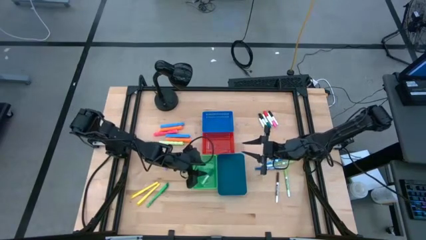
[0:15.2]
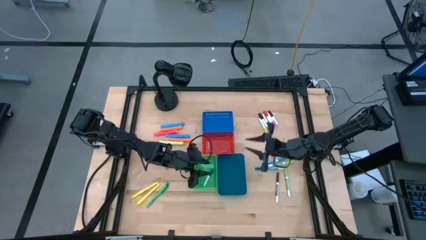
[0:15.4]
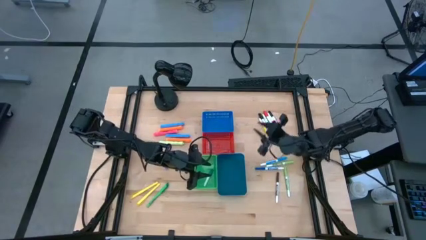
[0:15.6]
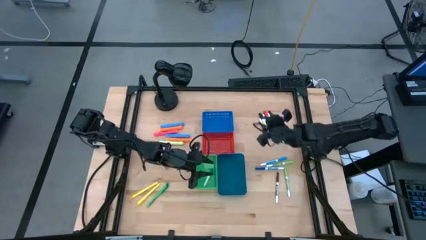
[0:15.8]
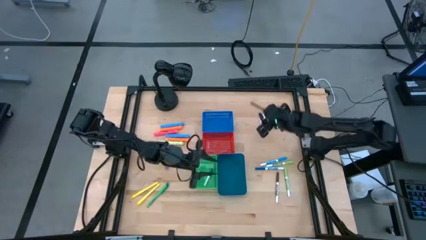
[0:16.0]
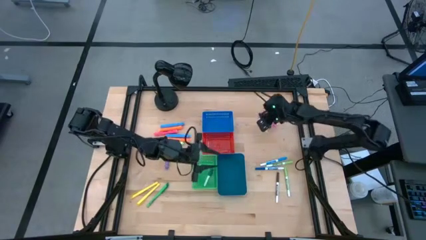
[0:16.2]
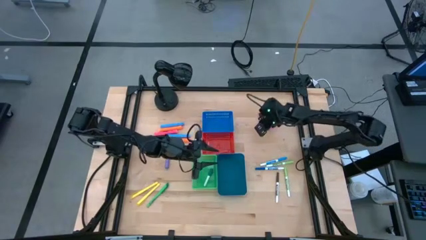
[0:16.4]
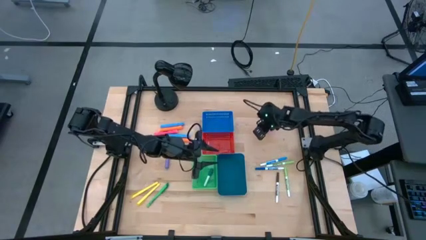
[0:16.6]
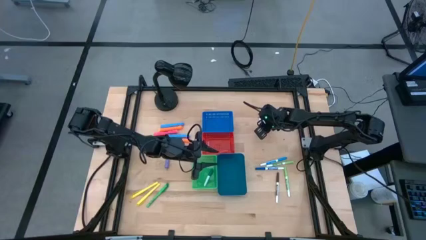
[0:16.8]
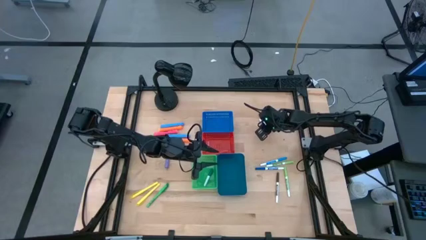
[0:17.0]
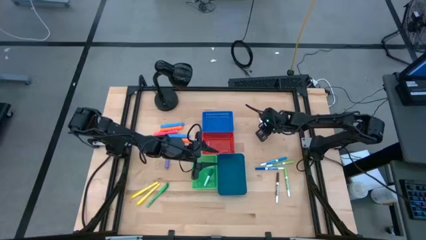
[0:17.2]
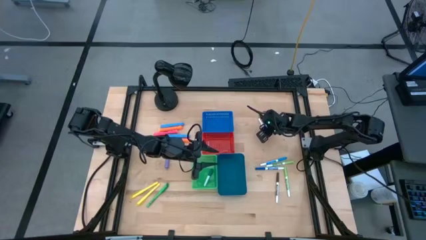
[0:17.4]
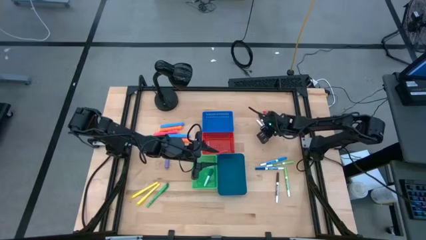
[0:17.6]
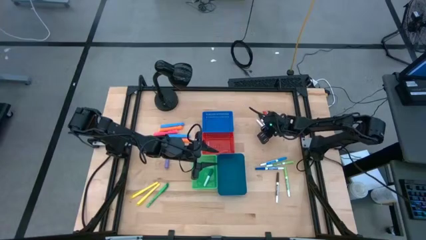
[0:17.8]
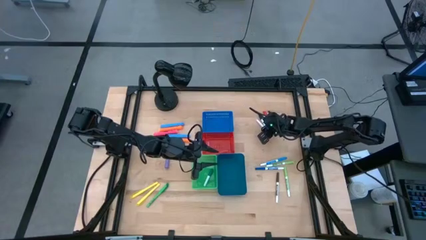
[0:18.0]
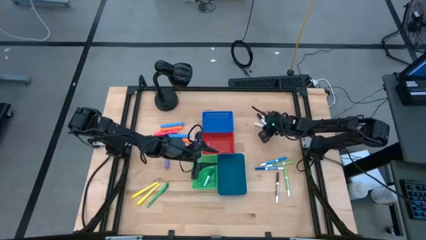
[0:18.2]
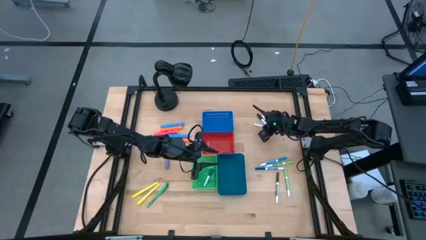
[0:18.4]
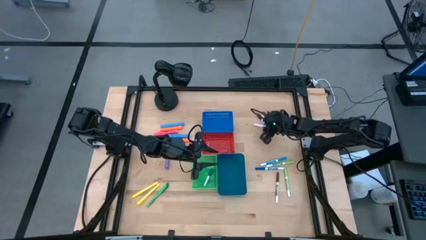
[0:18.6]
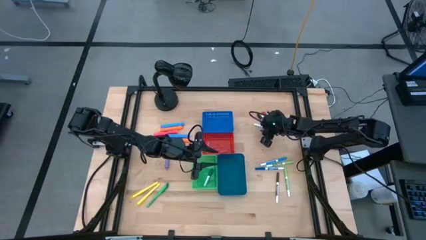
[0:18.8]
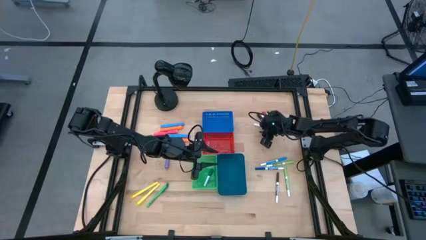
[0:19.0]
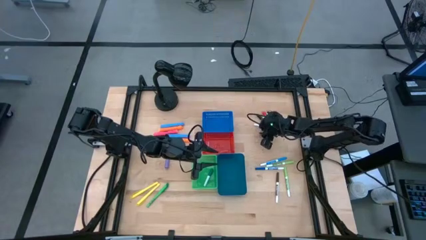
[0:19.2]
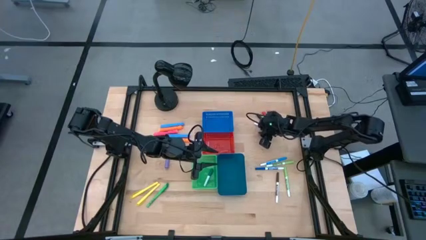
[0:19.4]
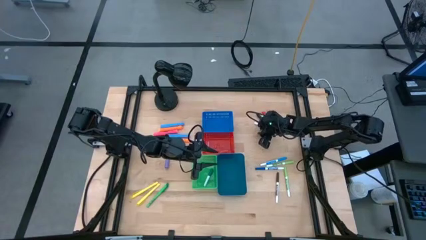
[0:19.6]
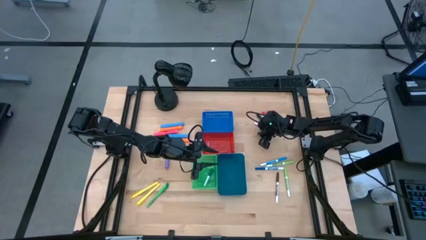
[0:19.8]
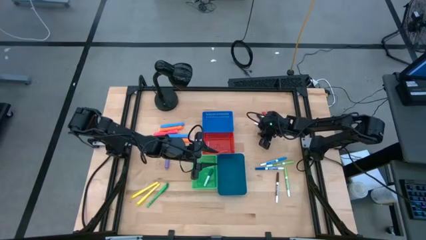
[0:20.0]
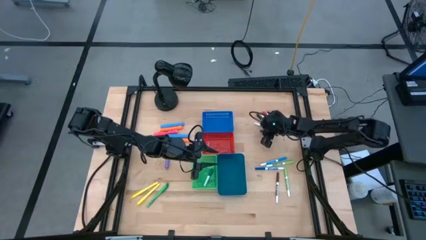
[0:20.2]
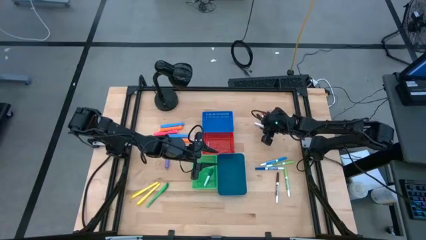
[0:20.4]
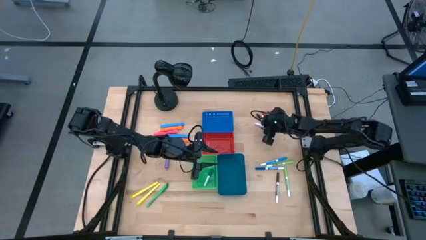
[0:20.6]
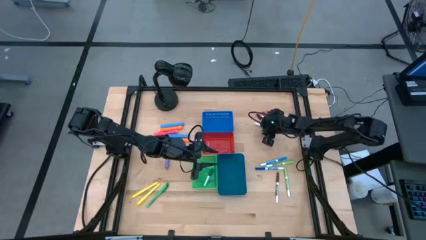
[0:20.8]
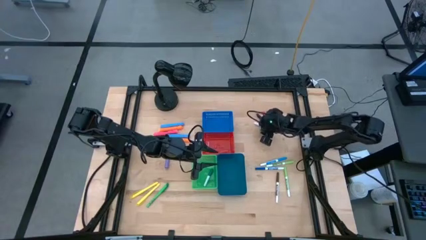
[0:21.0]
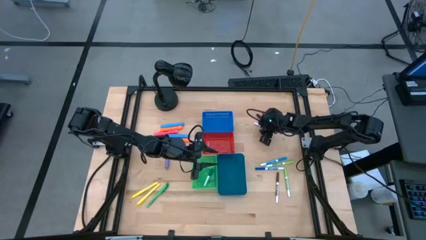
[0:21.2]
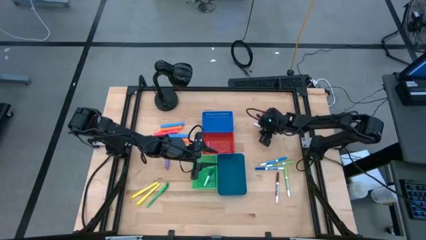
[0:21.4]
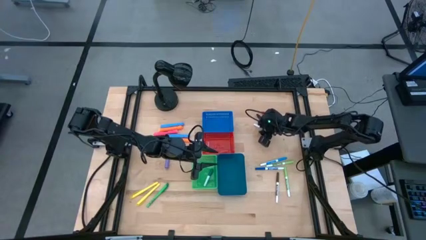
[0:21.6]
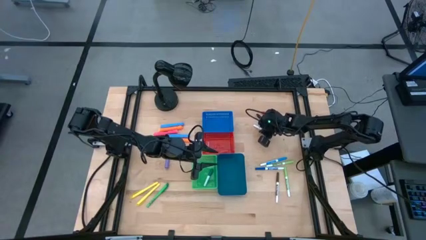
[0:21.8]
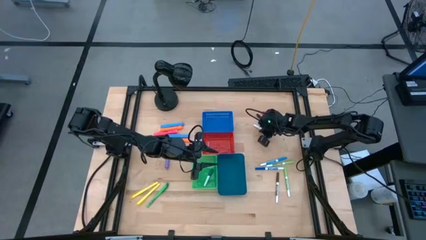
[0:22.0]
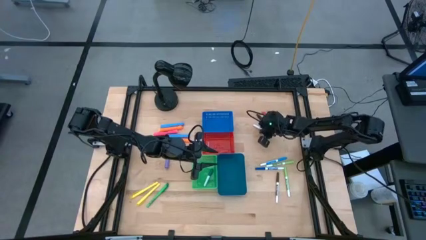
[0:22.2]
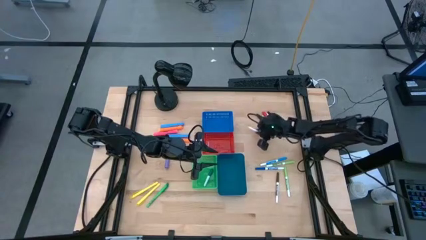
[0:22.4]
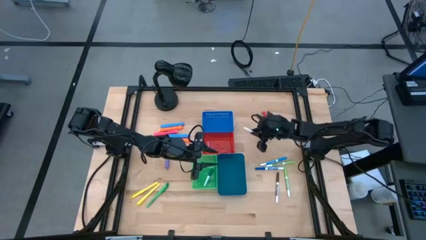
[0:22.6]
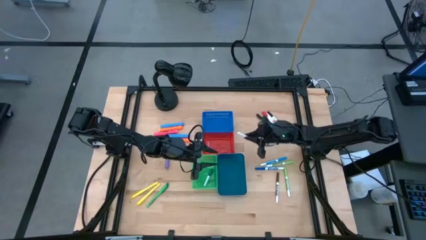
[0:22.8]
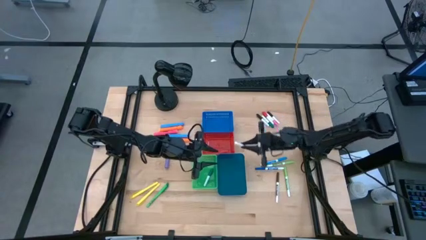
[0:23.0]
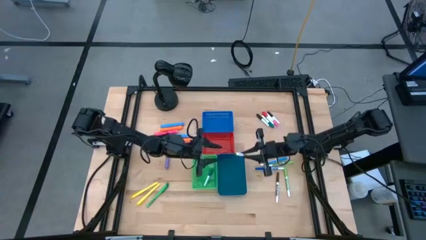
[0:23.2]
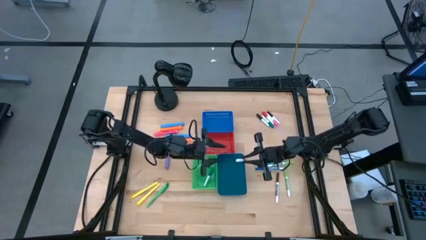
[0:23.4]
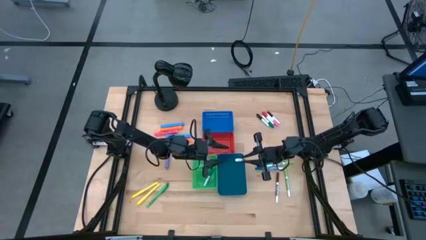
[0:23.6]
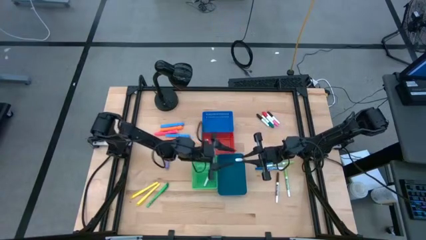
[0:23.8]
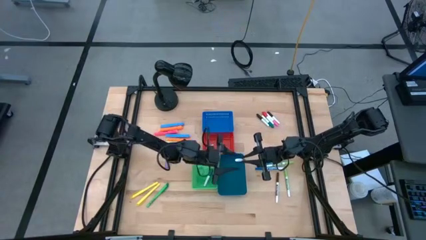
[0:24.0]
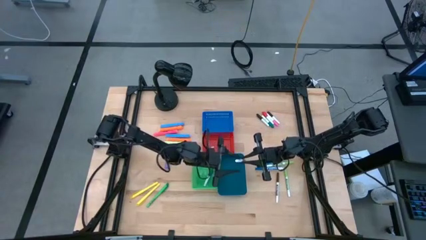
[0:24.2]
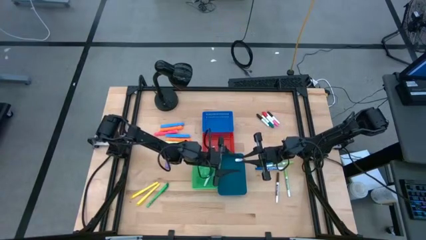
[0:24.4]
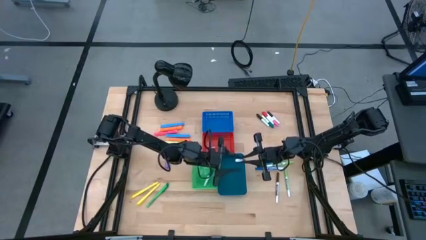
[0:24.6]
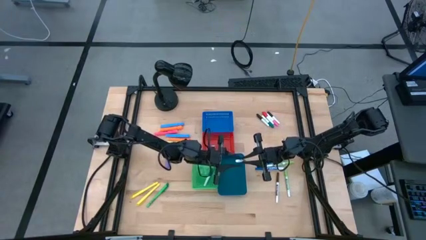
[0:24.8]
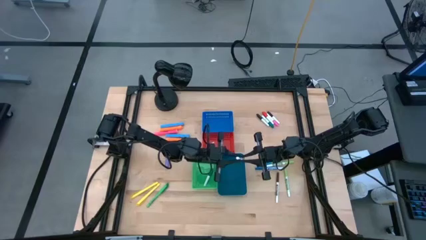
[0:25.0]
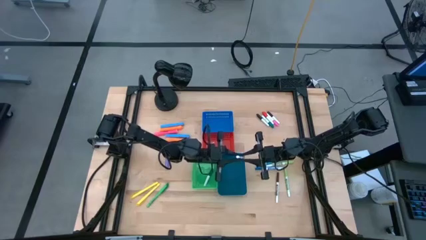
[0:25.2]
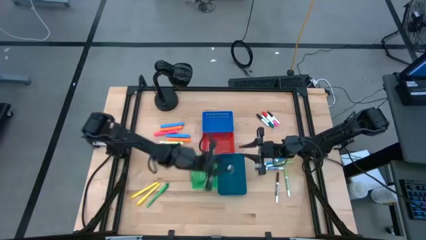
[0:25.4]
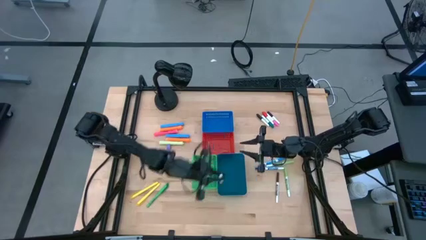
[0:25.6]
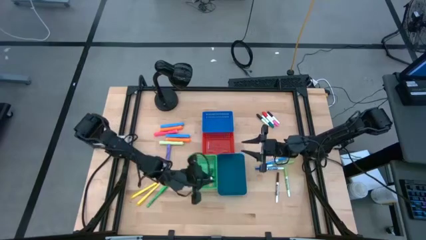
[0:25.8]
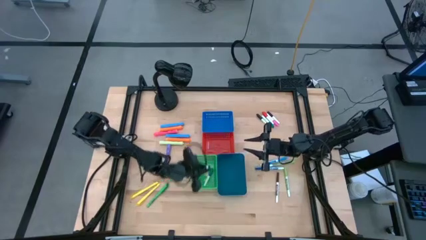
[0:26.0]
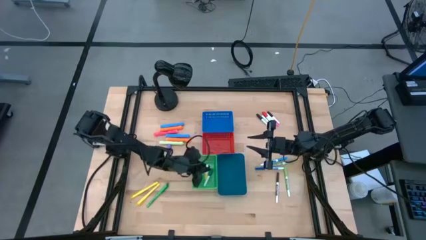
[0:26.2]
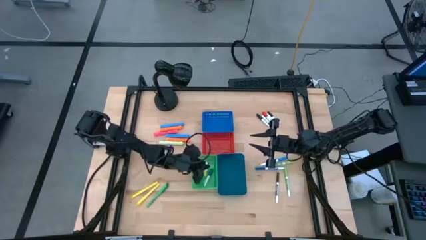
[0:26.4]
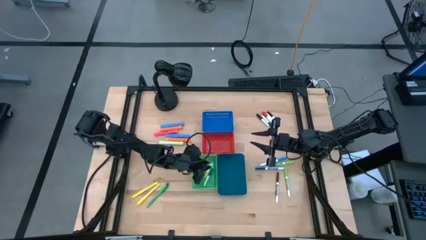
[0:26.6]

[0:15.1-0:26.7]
Task: Pick & Place Markers
Put the small yellow highlighter pen into the green bin

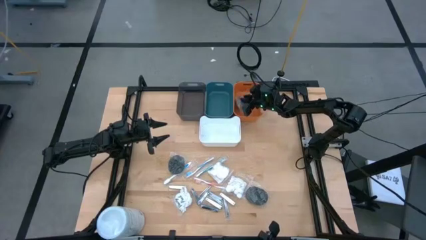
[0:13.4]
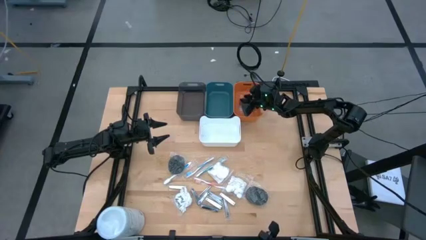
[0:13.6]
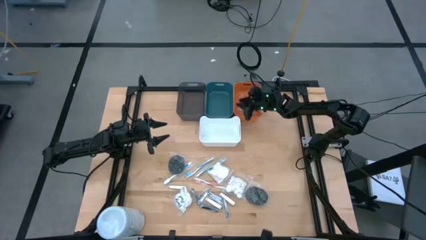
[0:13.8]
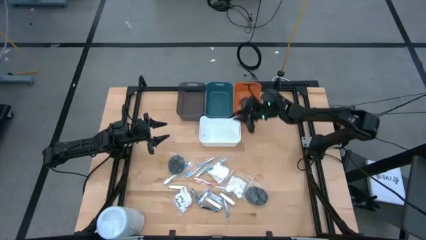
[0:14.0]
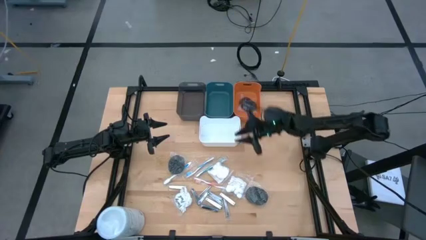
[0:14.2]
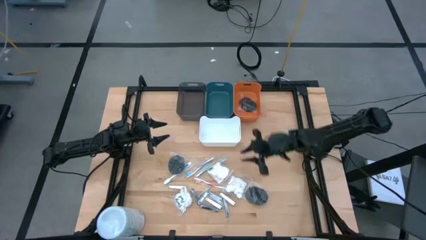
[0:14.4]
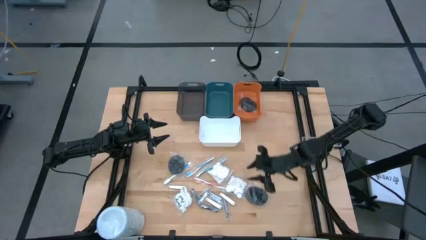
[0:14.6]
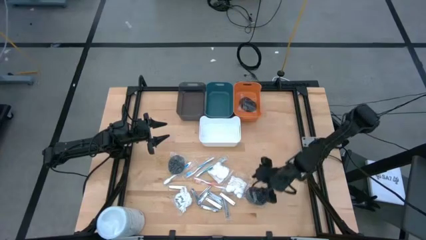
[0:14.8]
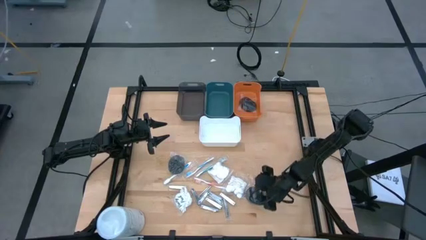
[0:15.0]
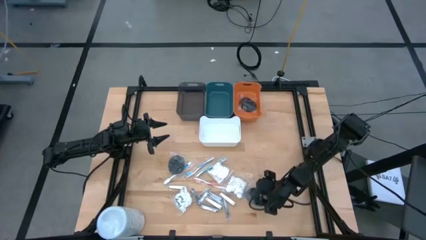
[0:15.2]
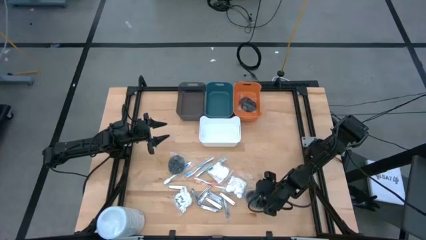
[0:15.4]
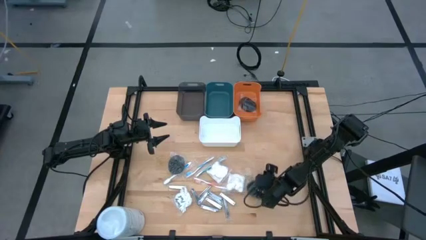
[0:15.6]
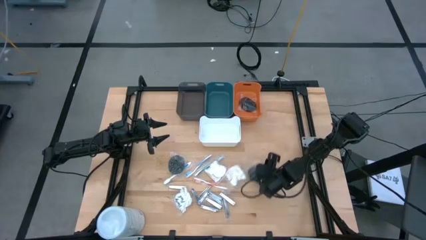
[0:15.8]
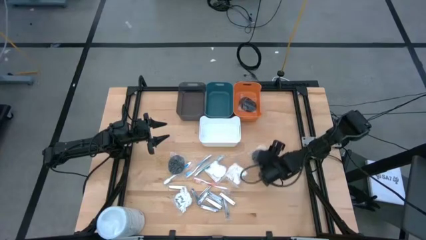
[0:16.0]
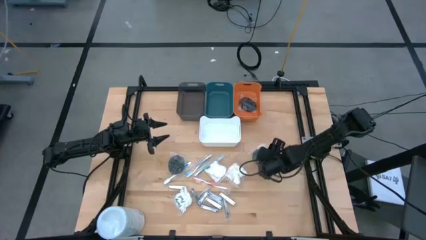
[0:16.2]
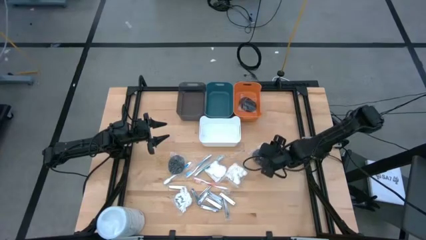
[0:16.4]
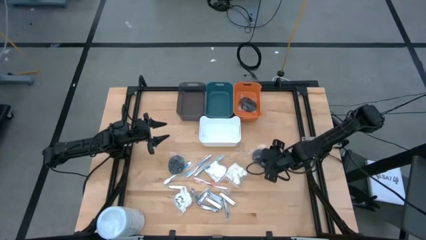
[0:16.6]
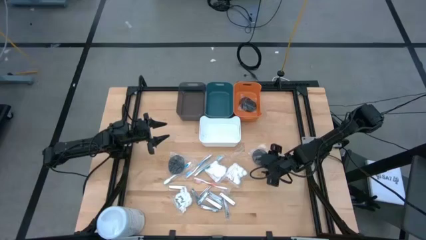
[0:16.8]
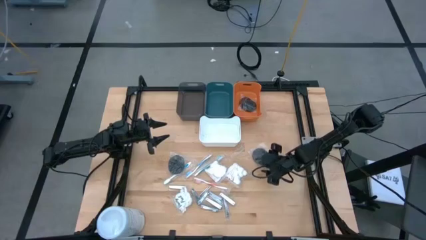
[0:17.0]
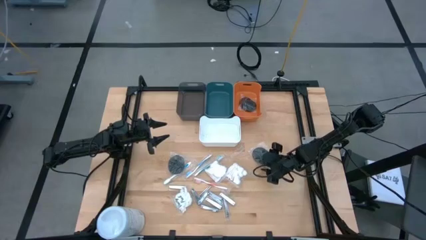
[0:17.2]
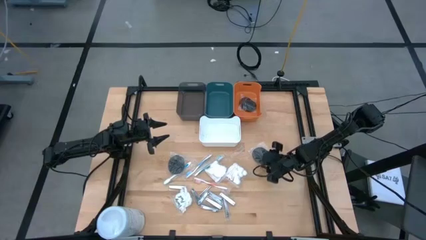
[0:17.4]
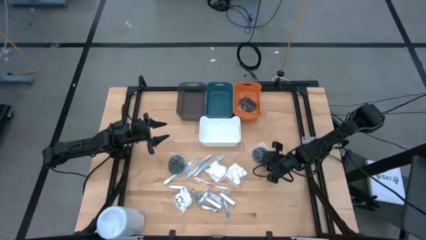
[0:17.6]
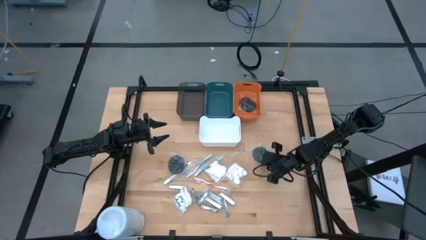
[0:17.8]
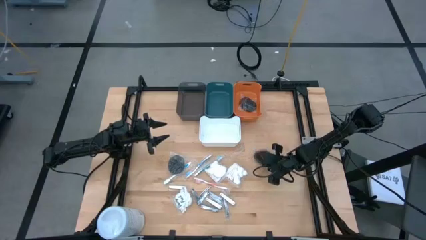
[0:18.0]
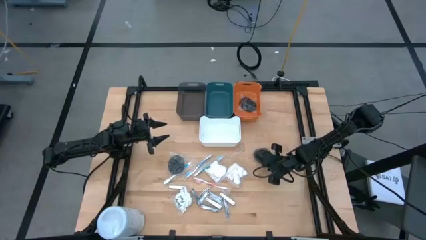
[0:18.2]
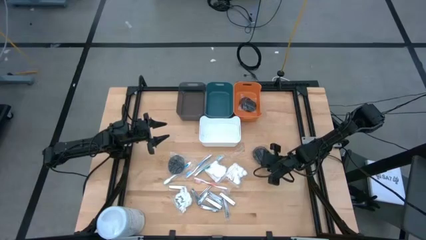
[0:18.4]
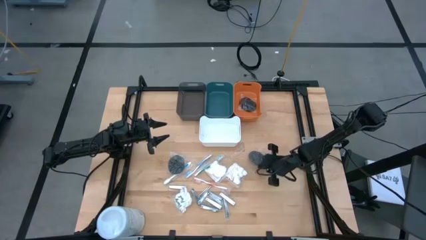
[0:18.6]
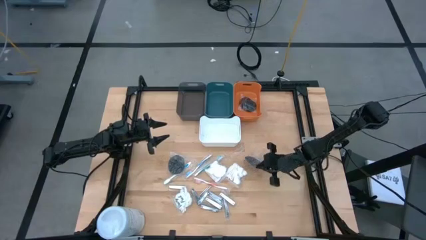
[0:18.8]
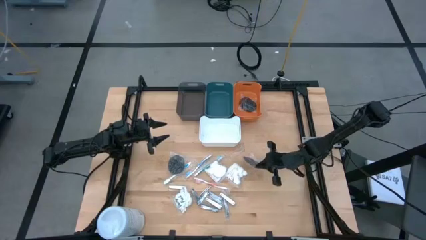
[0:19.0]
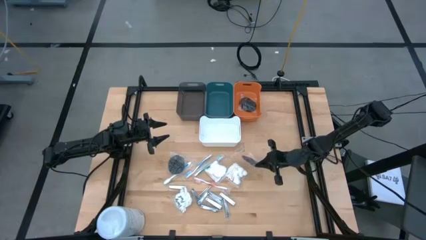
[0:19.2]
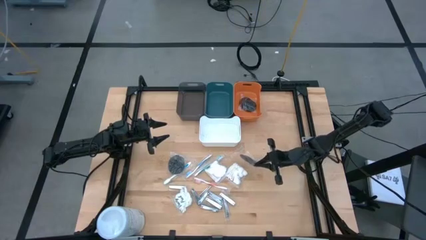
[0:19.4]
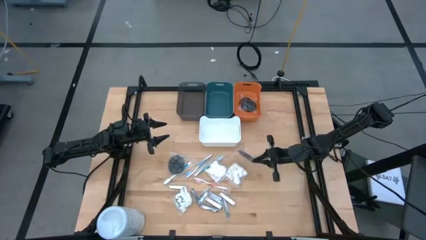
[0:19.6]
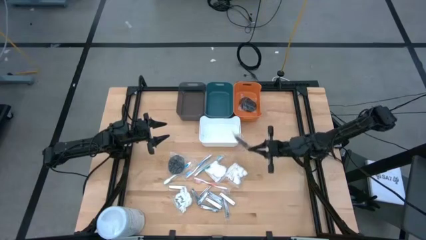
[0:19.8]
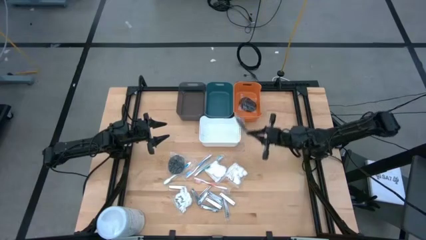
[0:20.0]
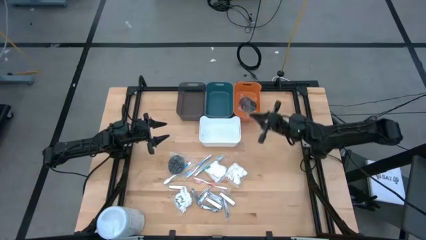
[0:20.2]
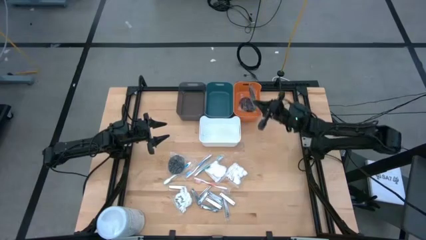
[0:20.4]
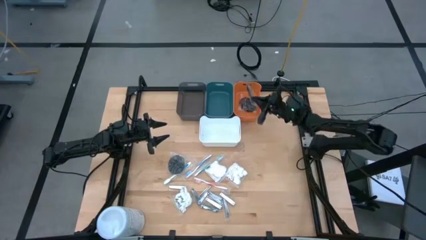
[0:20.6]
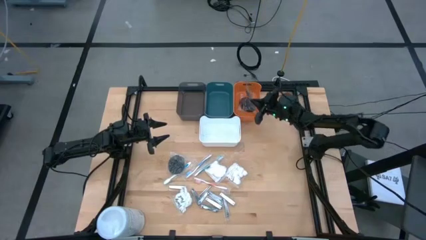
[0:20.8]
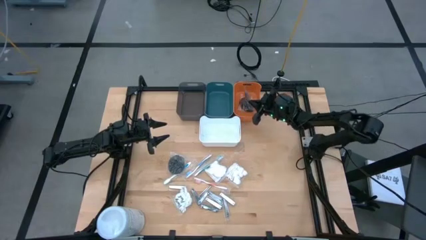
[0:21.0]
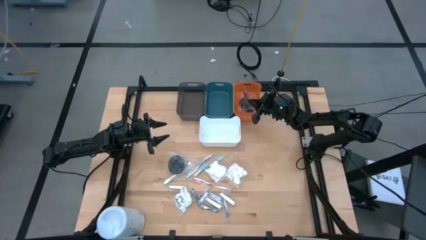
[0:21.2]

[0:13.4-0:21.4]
Task: Pick & Place Travel size toiletries
Put the black hairbrush into the orange bin
